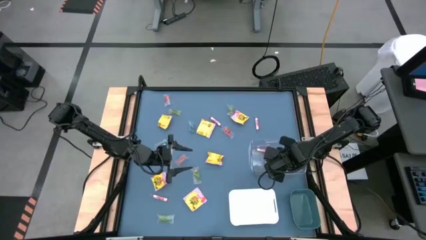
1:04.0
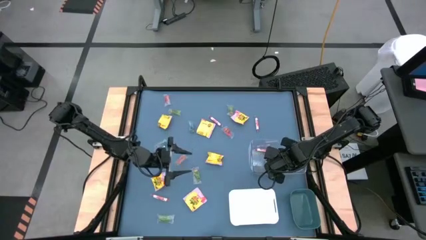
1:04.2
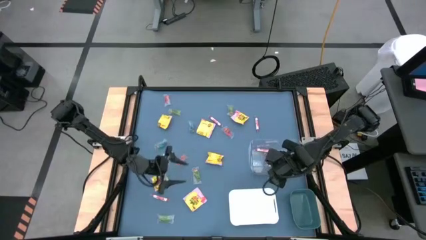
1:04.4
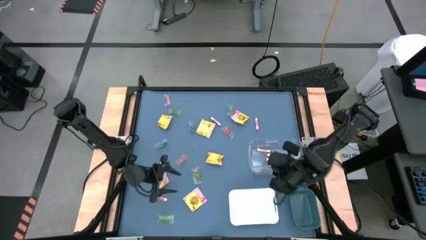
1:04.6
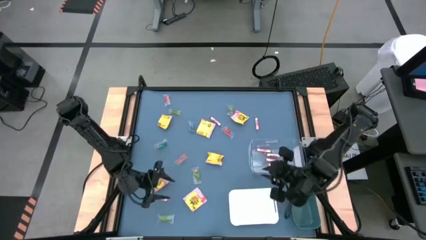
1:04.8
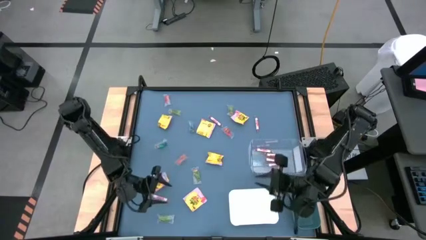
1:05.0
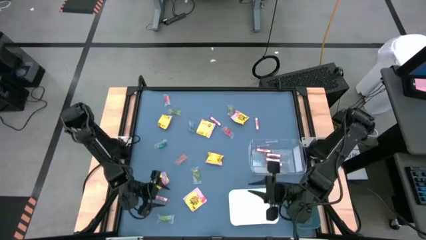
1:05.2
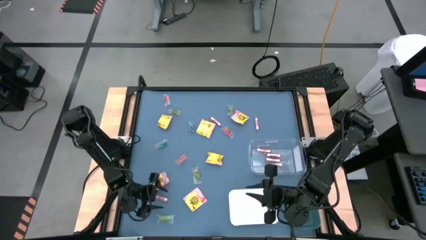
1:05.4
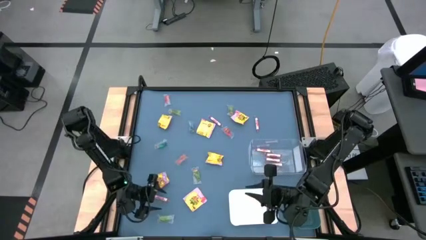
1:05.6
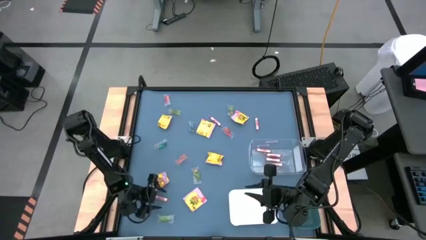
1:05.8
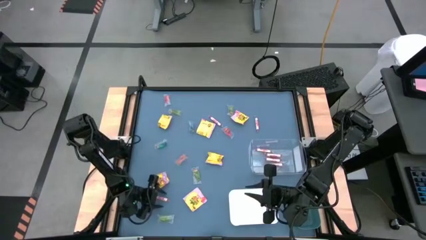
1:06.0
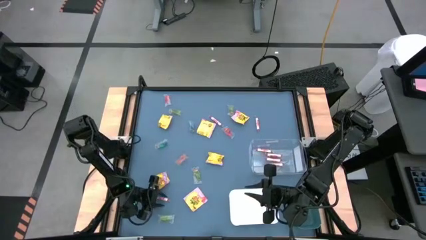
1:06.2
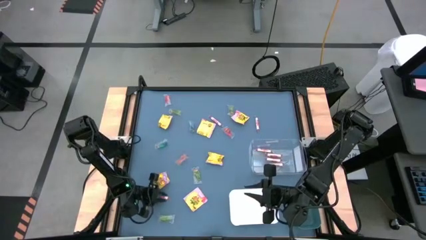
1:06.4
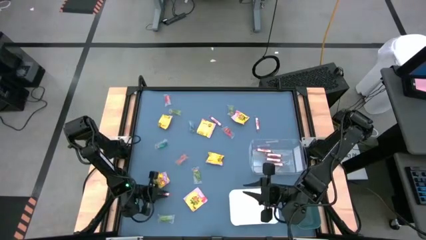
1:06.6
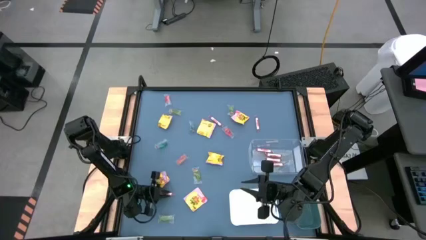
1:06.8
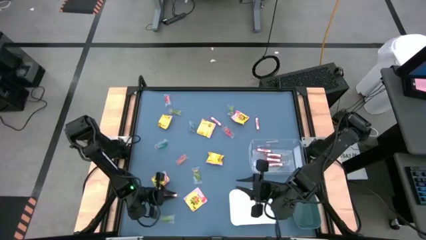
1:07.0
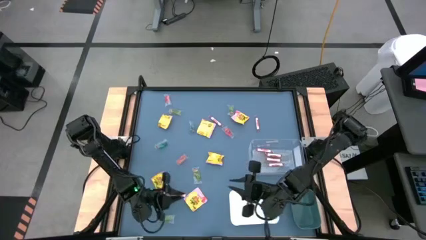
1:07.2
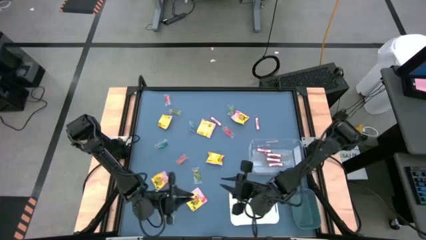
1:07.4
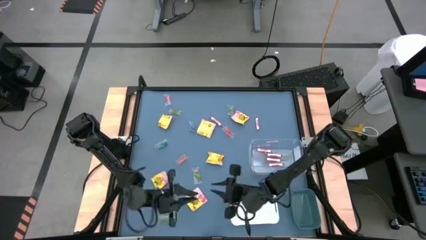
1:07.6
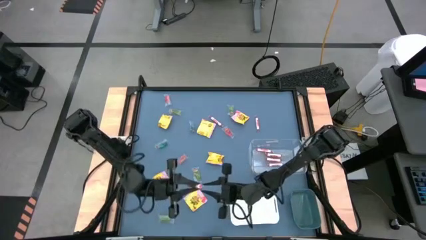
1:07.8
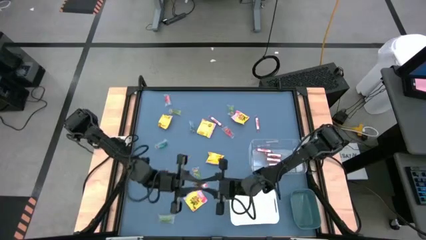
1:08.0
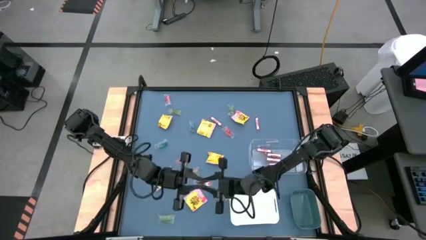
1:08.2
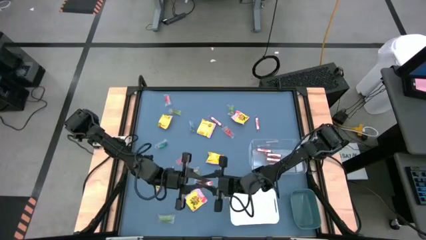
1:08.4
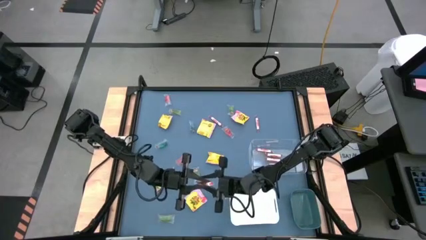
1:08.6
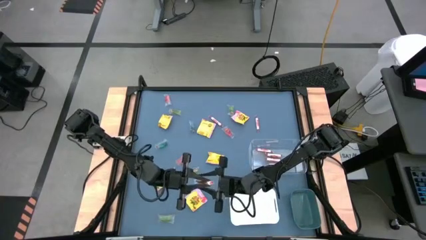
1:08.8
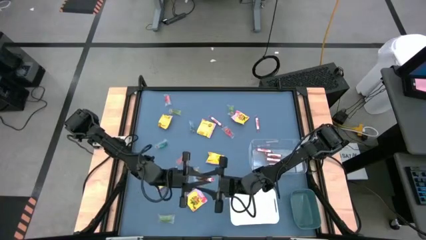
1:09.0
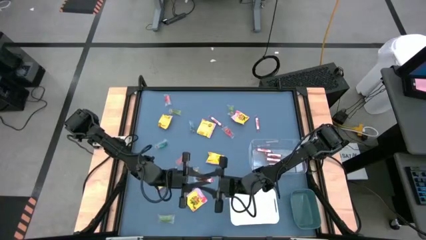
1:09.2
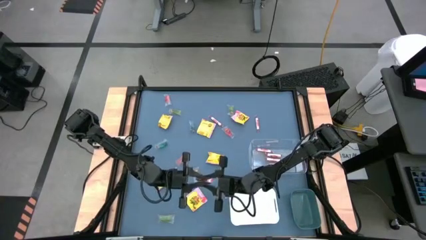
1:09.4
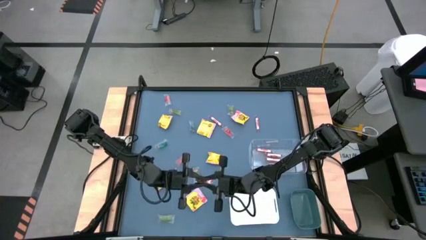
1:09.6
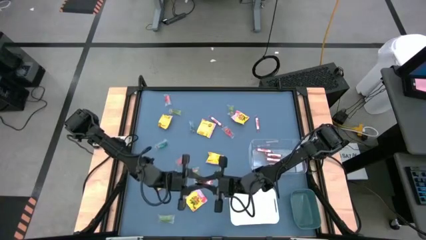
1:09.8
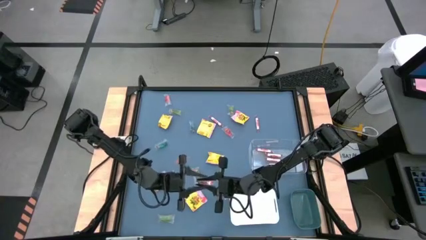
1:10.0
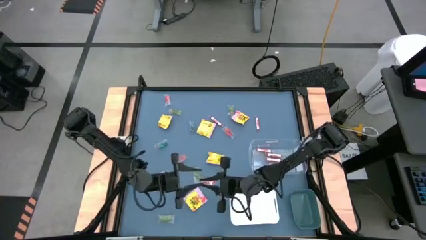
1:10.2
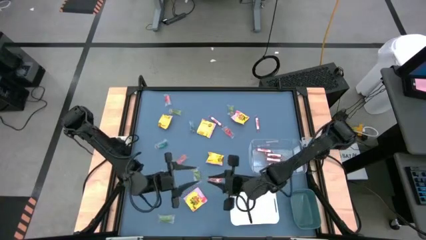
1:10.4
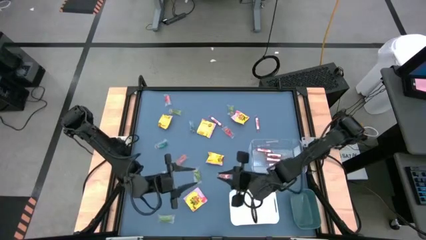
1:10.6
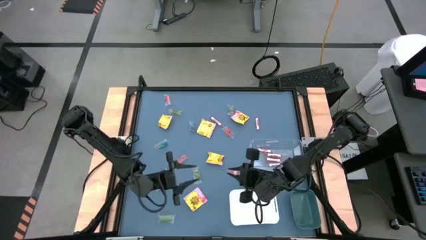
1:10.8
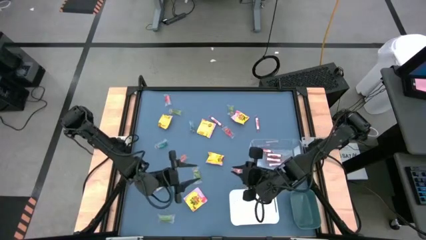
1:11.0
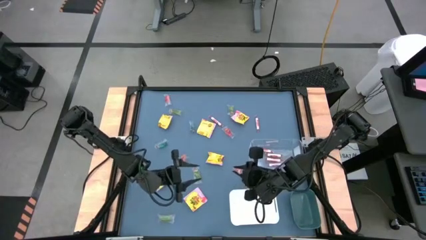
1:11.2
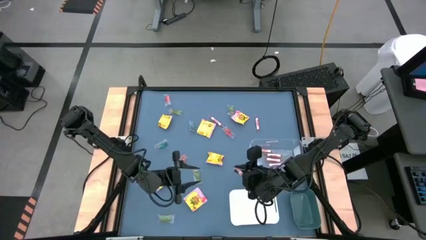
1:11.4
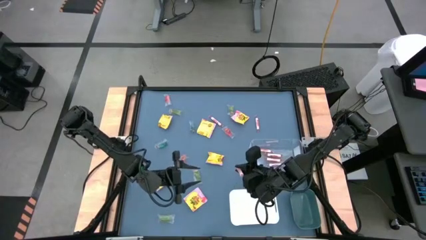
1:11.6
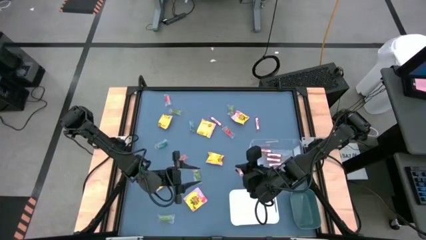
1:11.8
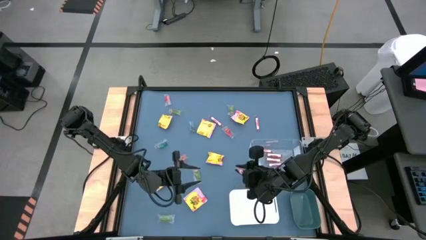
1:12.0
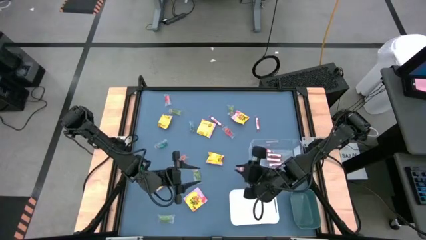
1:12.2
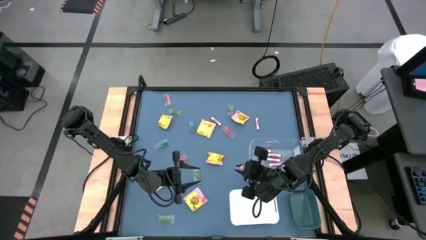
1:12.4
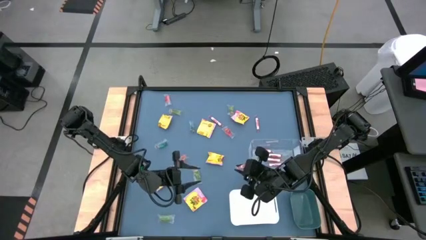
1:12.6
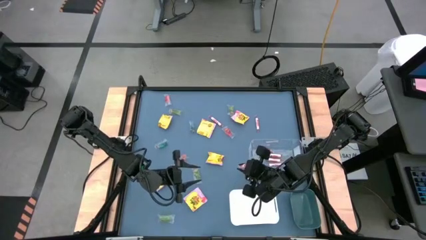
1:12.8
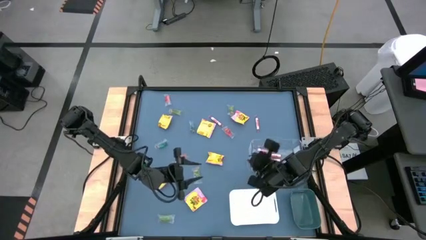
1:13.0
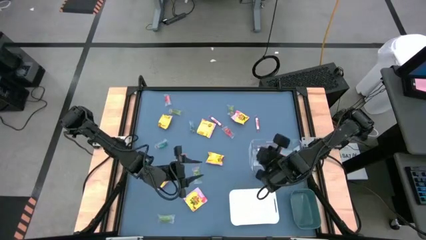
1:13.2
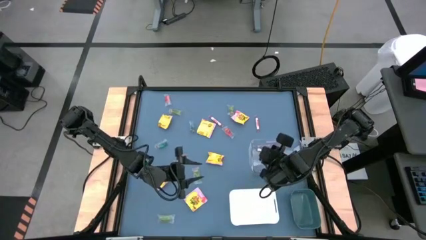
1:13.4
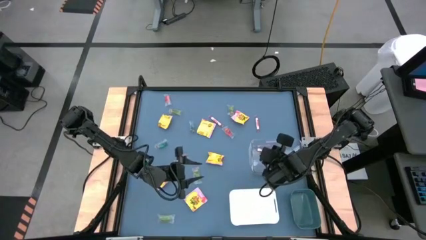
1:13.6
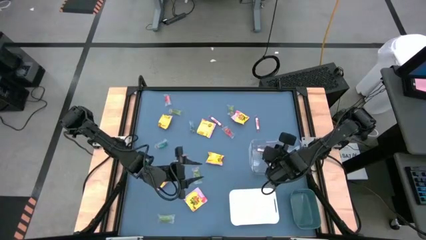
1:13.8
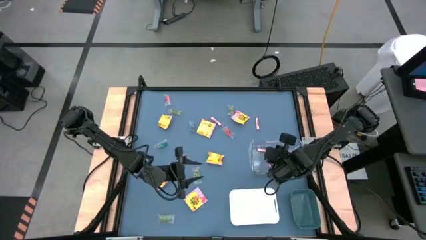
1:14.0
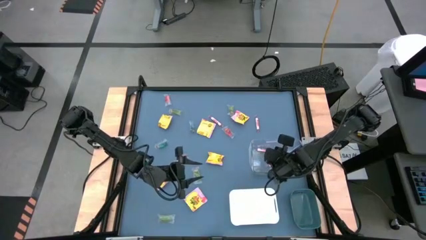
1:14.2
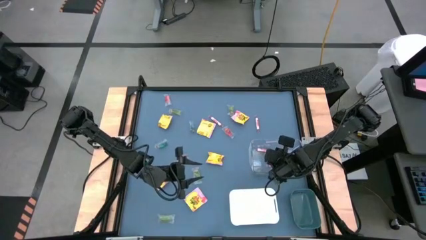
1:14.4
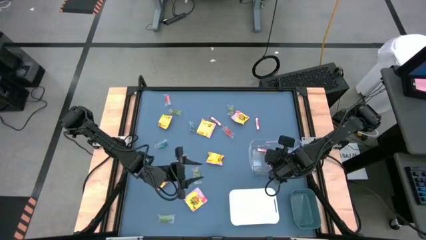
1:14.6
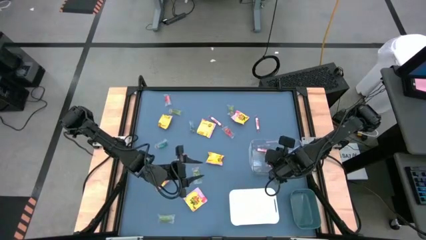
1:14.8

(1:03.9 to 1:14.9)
Task: Sort candy
Put the transparent candy roll into the transparent bin

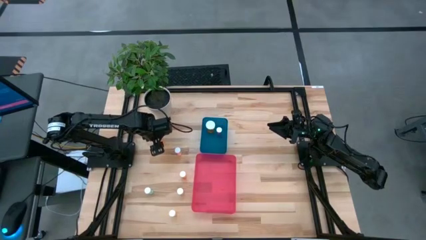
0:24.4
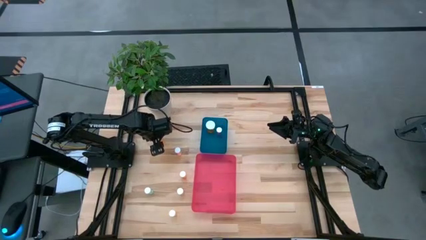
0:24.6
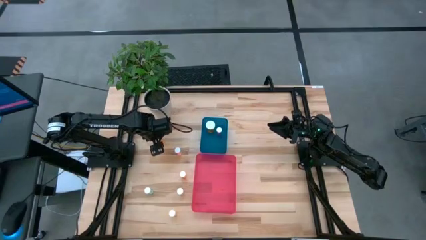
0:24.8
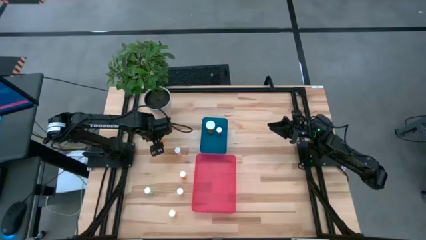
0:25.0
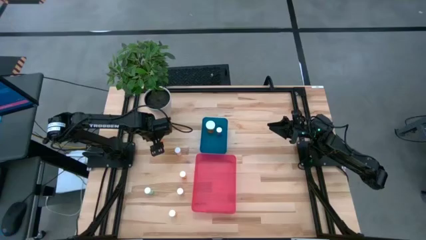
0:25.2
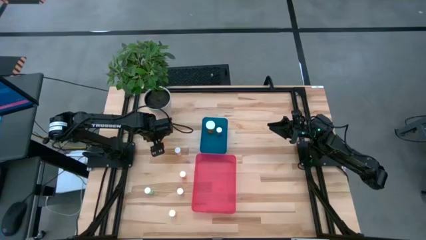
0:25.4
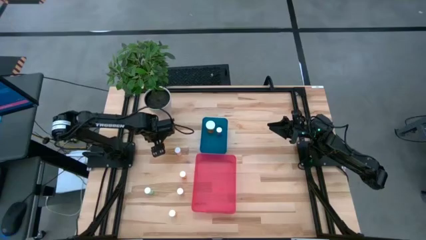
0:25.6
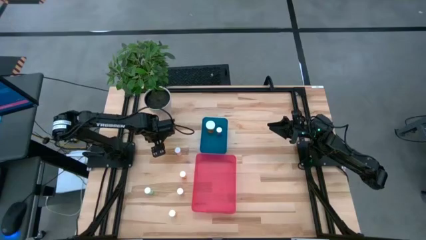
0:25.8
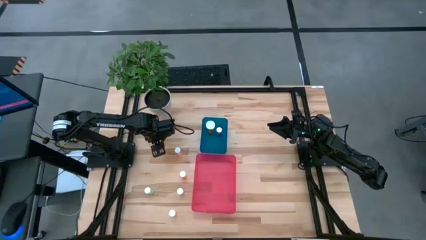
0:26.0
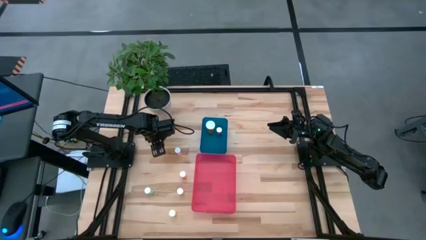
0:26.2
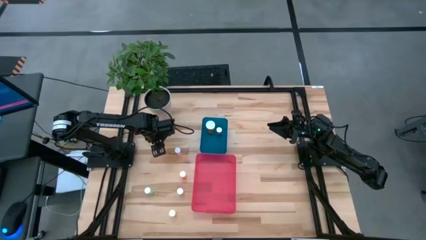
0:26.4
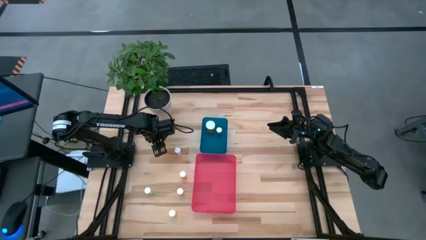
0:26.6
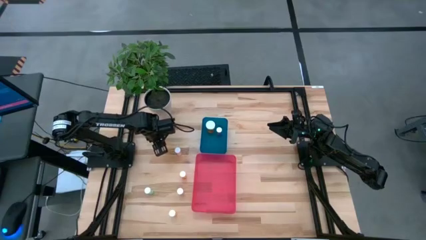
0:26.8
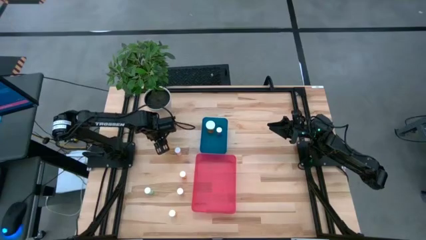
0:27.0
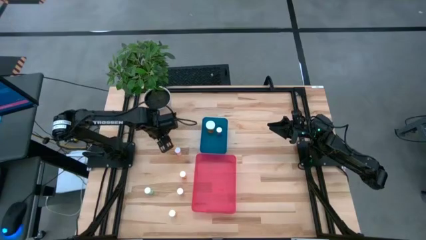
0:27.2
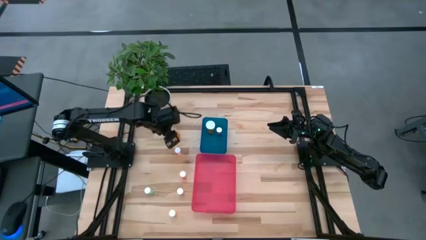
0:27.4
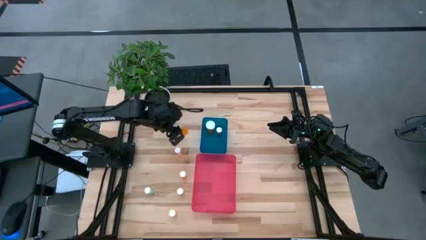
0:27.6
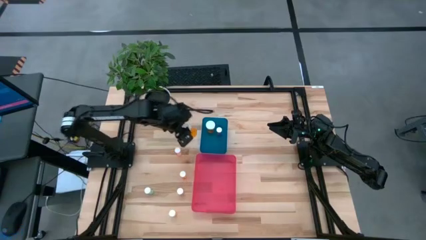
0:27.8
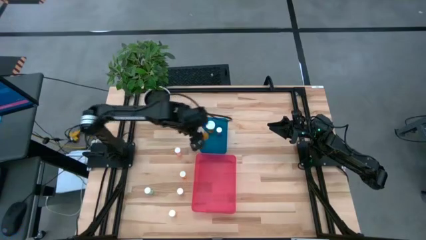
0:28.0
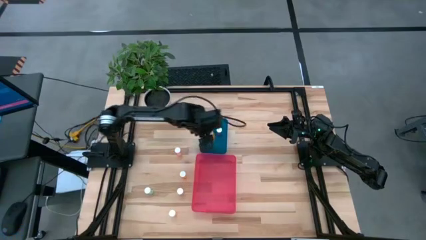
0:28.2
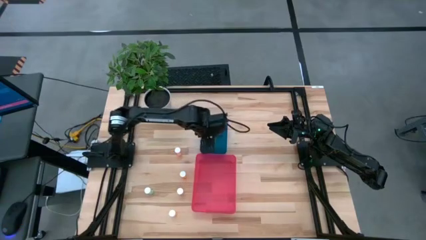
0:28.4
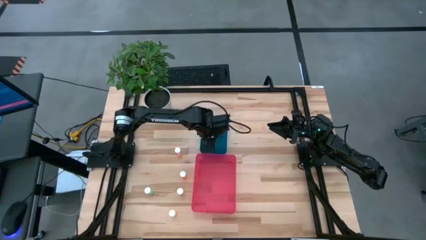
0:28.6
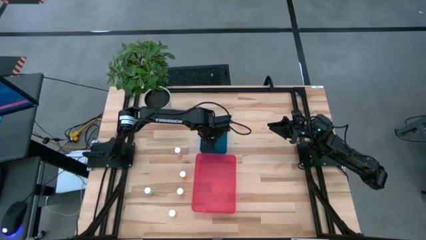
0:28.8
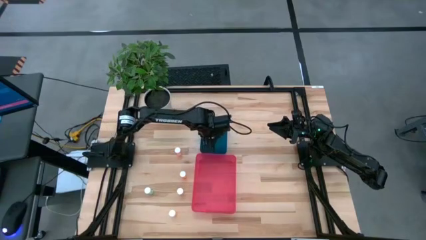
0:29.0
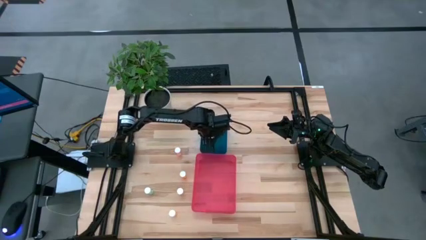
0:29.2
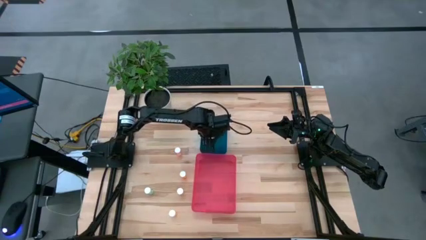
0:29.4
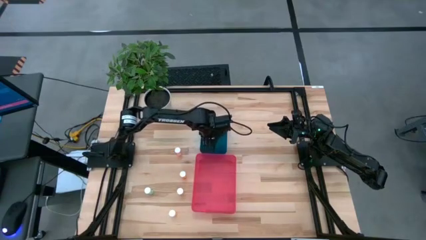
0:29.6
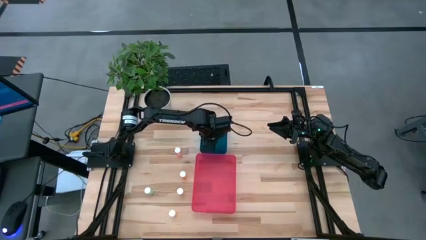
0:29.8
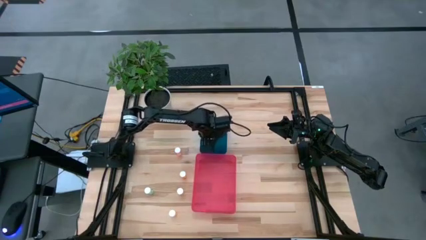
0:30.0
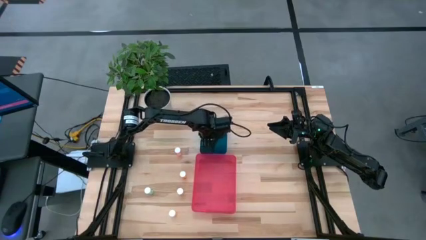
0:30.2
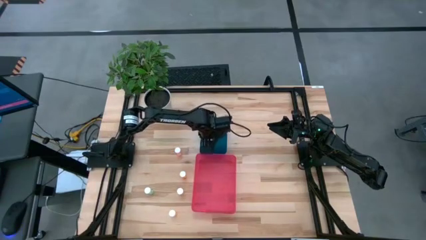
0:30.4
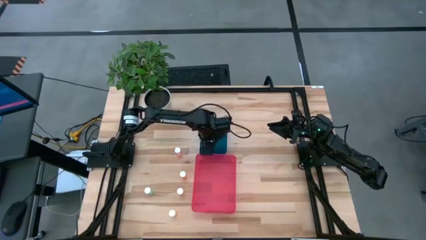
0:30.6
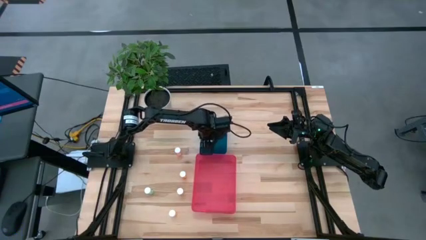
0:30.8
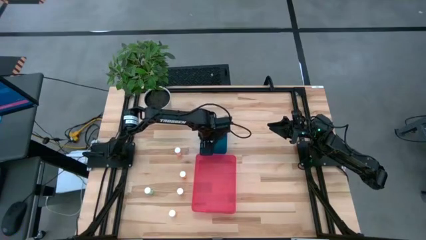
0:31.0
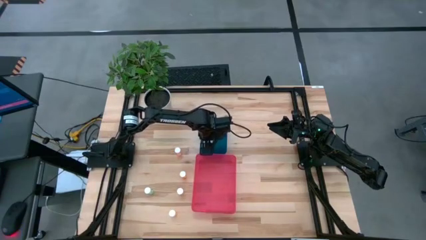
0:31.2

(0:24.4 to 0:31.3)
Task: Pick and place medicine bottles into bin by pill shape (circle, oval)
Put the large orange capsule bottle into the blue bin
